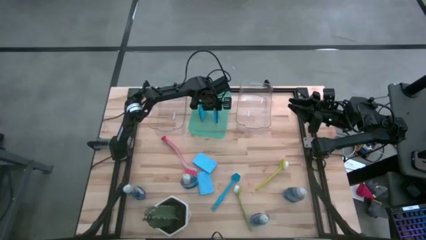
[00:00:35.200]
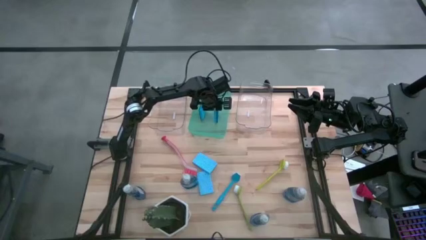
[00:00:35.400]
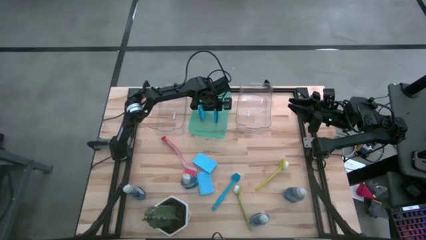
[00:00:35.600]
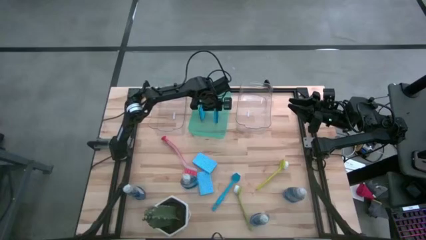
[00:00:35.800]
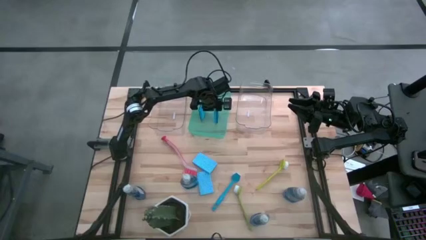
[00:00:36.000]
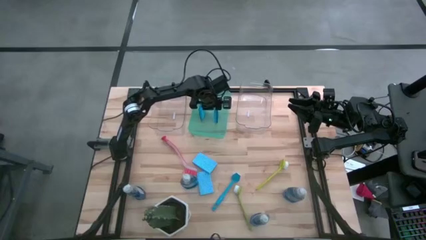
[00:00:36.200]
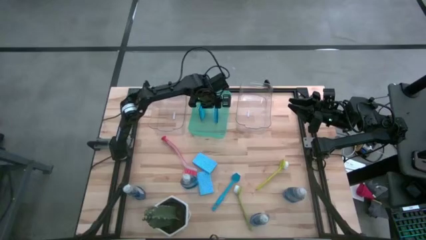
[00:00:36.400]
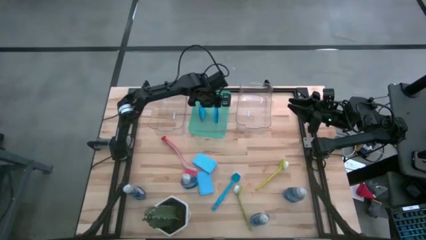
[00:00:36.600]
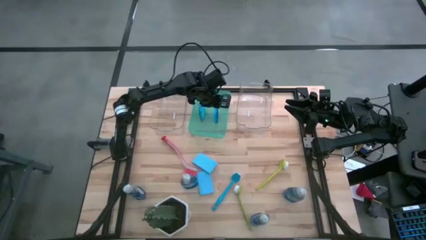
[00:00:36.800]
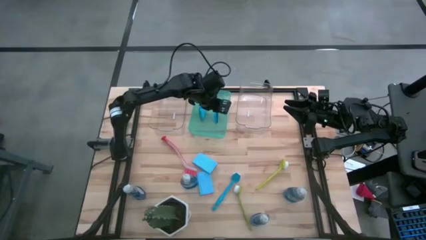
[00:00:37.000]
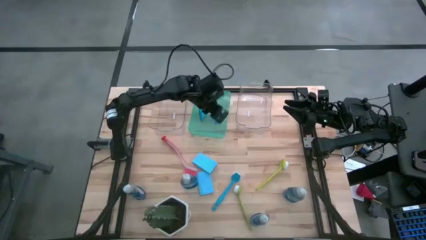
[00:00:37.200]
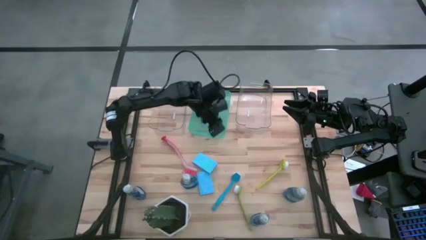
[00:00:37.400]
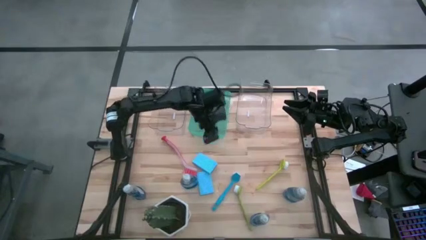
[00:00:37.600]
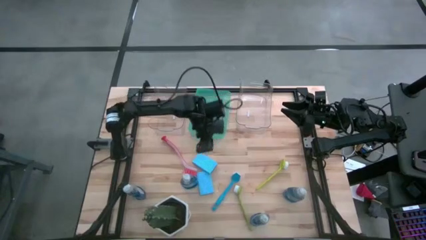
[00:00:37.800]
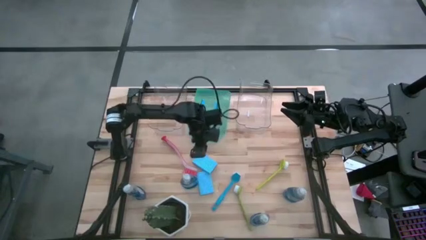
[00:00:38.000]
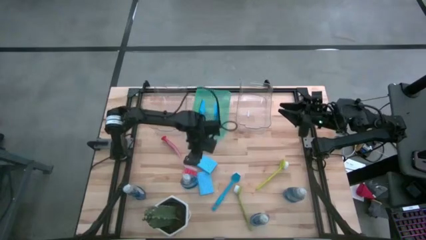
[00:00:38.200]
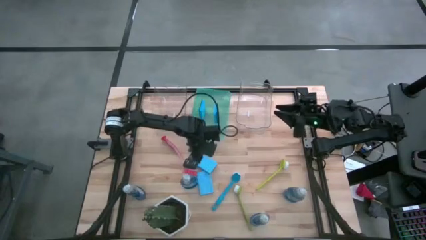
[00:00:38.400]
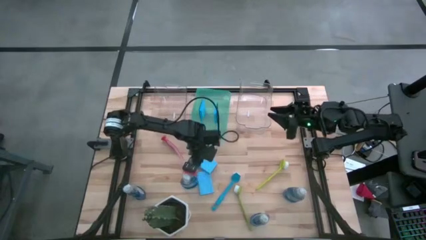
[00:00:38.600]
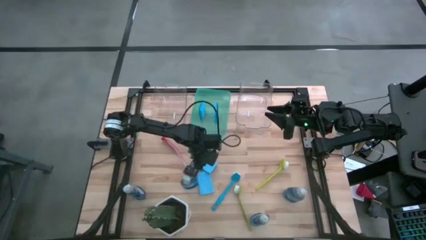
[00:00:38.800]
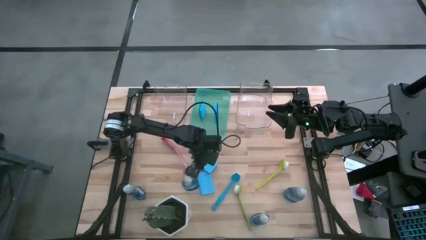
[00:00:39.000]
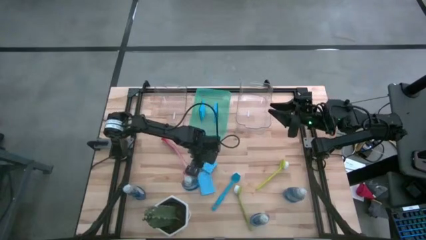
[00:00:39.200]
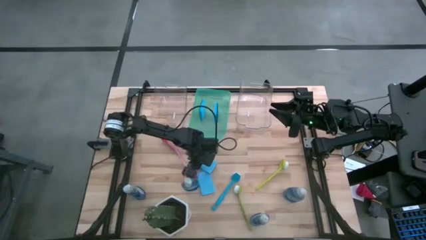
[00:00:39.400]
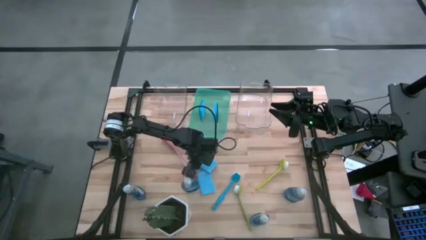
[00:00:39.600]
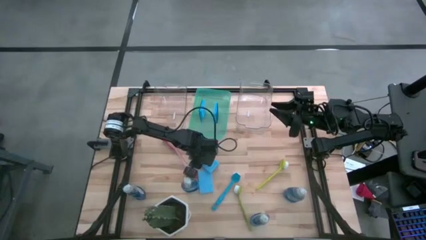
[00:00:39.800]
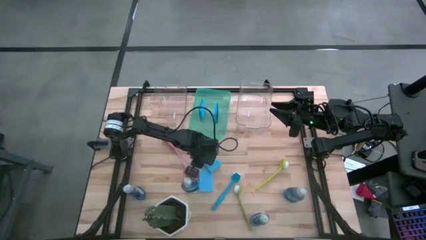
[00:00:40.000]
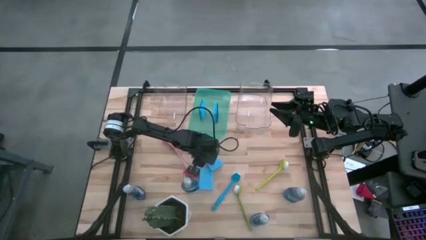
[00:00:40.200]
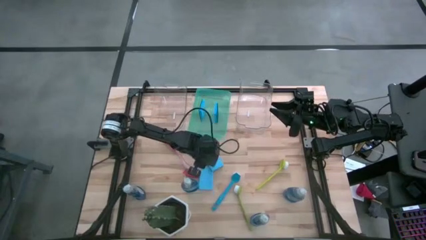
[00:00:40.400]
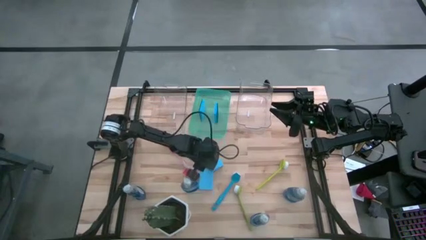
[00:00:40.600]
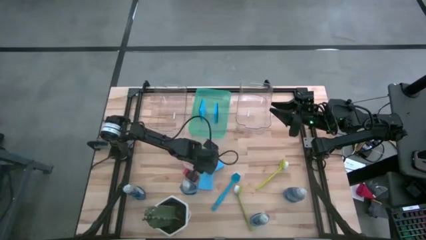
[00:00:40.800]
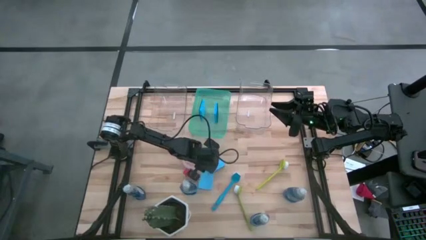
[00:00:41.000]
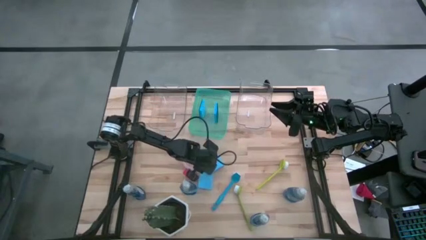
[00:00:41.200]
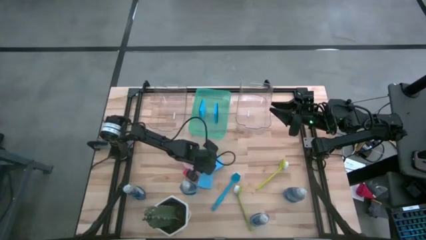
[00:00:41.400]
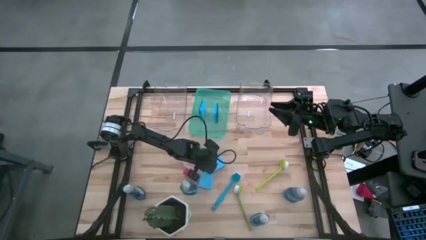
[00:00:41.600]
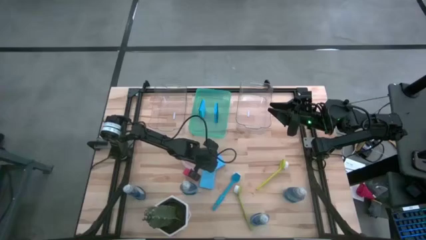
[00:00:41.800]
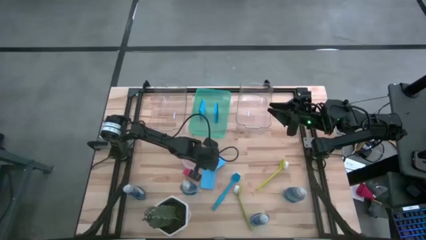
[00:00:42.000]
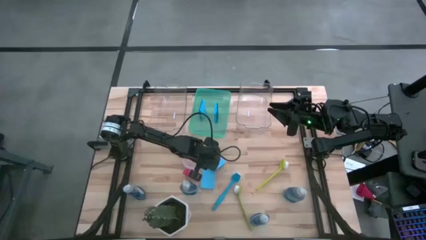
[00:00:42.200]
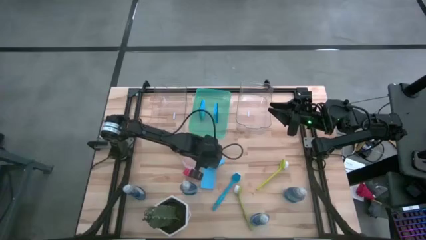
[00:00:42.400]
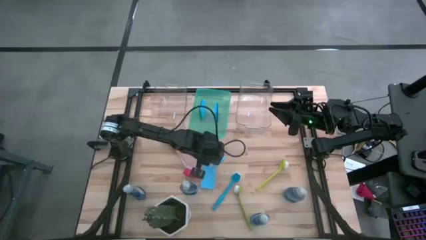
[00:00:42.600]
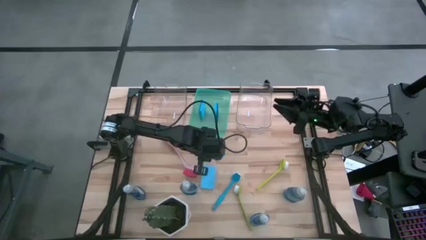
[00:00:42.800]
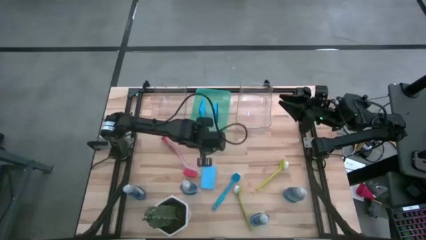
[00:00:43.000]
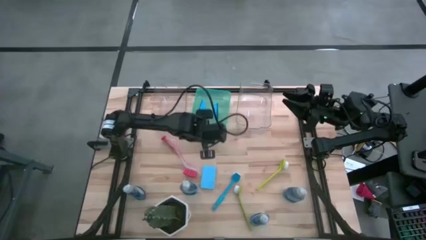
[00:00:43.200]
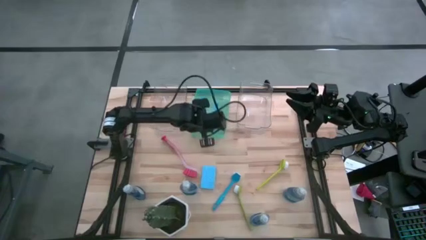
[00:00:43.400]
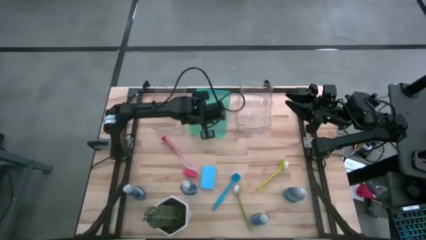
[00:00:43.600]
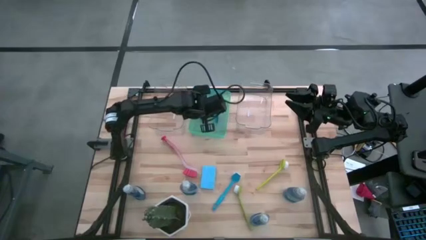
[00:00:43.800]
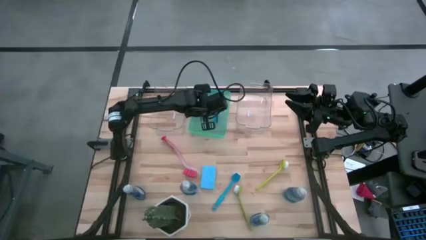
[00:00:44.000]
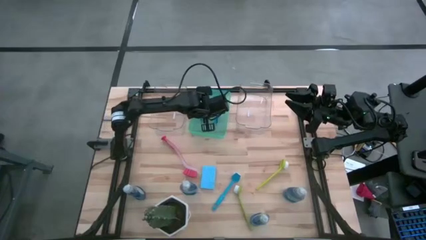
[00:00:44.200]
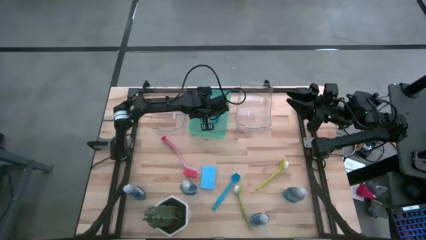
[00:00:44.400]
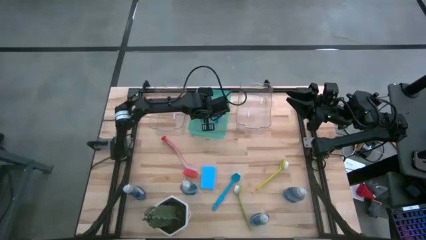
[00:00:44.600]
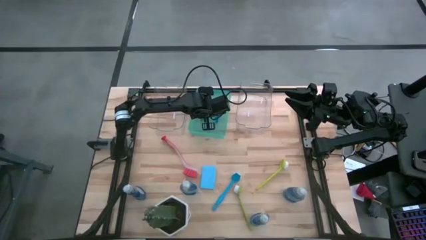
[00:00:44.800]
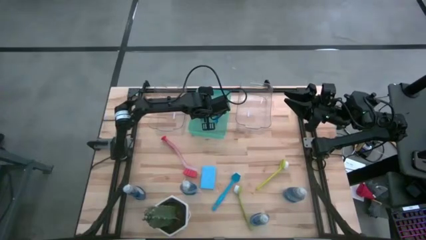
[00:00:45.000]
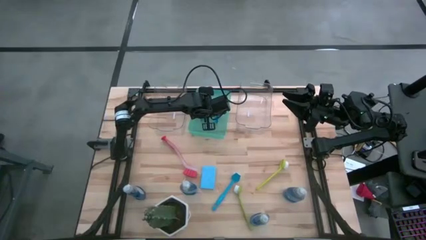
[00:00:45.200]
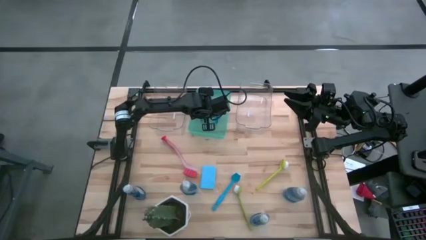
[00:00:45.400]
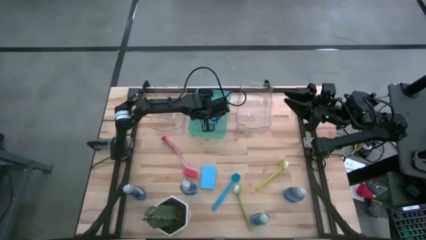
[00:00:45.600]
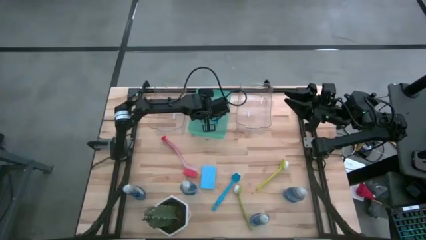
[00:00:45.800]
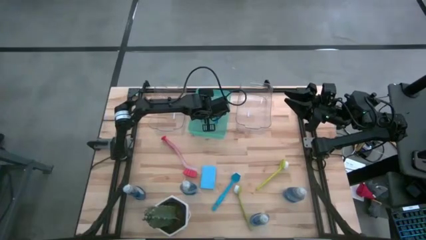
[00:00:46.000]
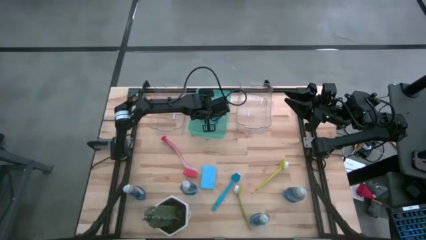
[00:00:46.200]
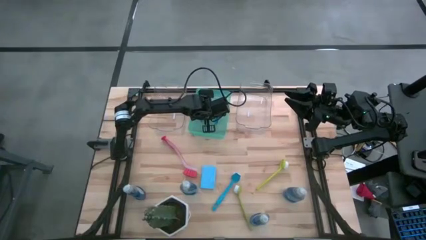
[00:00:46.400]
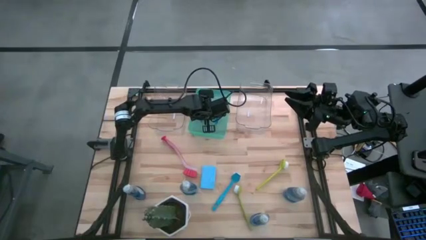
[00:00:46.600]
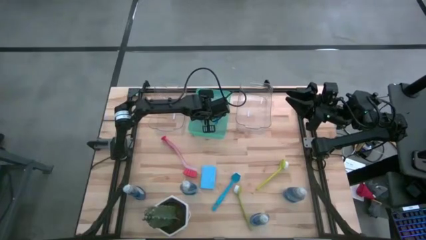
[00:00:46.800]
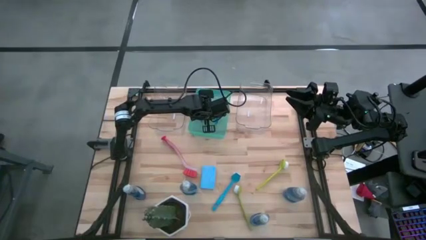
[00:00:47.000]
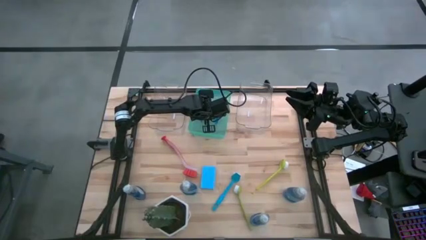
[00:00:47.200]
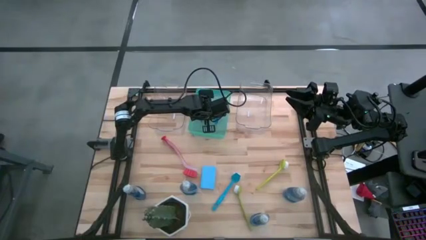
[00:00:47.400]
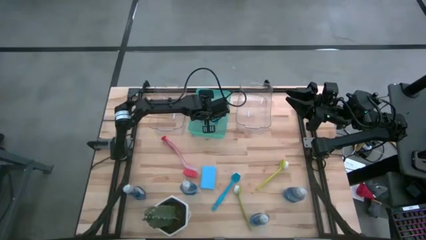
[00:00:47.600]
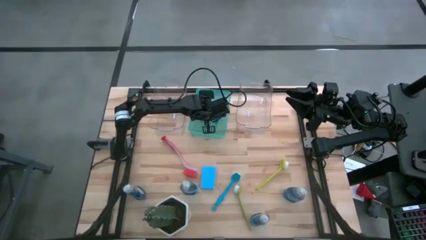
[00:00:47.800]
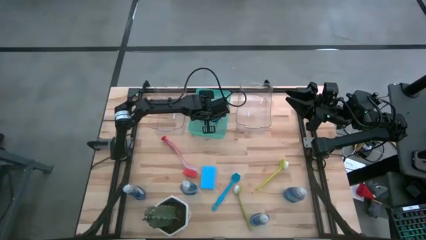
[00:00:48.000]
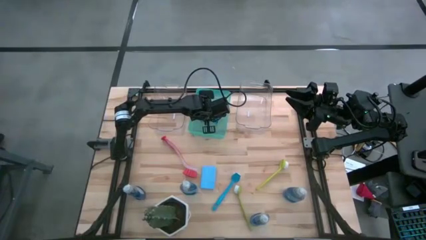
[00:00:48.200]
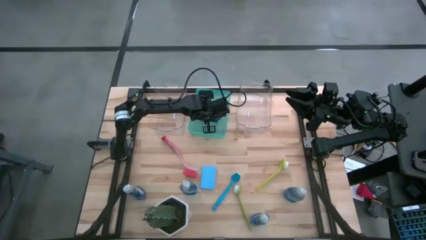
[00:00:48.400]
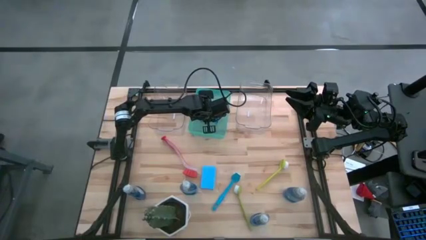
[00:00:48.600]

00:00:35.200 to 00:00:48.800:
Task: Pick & Place Kitchen Sink Supplies
Put the sponge into the green bin

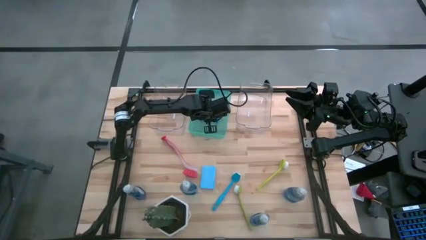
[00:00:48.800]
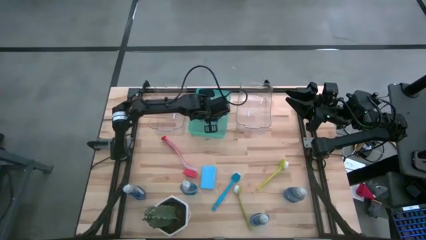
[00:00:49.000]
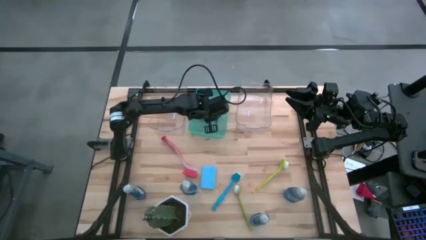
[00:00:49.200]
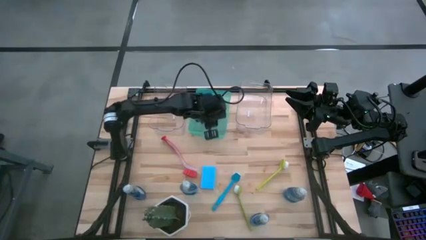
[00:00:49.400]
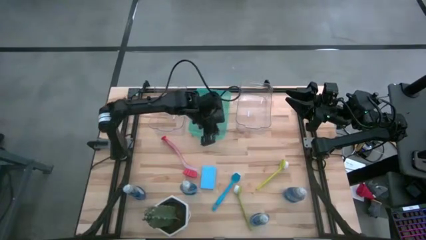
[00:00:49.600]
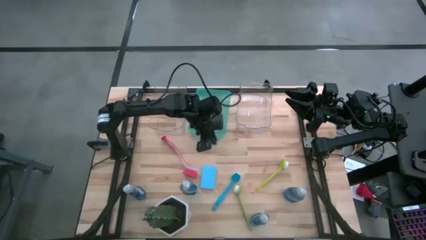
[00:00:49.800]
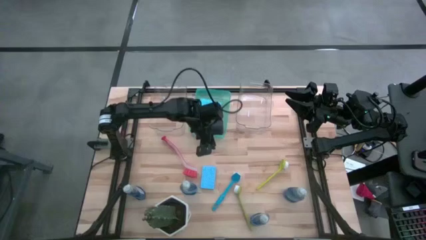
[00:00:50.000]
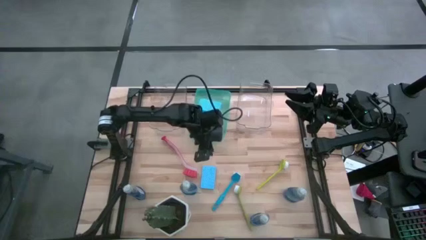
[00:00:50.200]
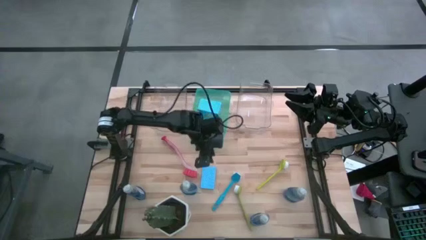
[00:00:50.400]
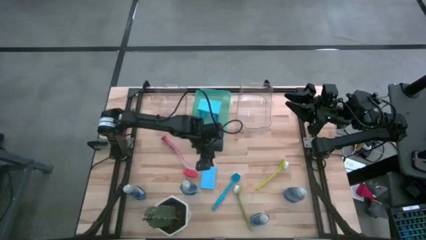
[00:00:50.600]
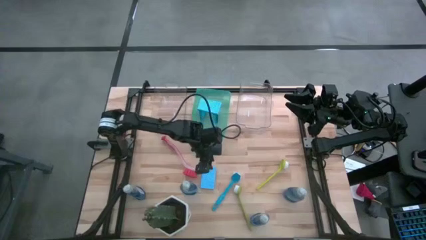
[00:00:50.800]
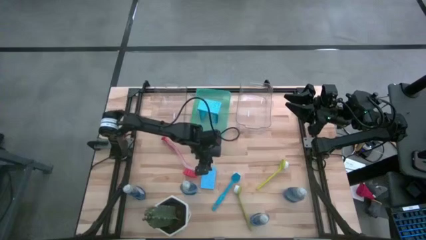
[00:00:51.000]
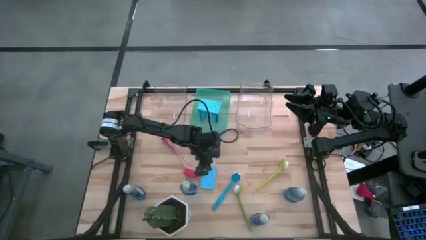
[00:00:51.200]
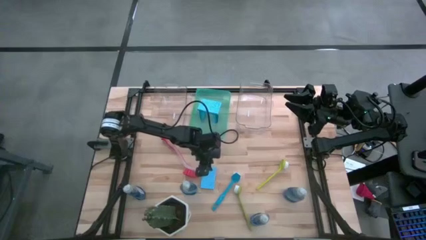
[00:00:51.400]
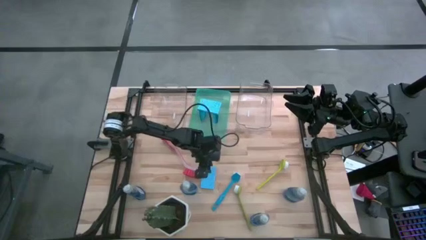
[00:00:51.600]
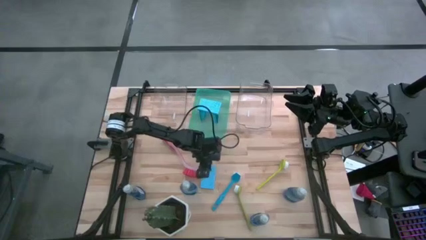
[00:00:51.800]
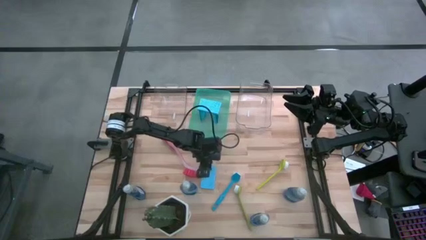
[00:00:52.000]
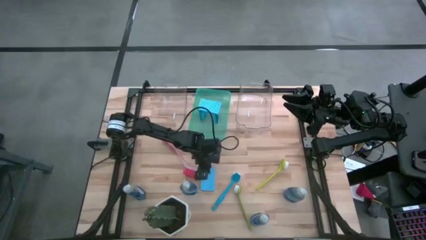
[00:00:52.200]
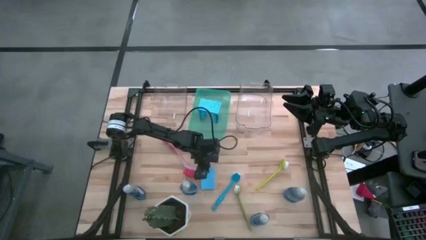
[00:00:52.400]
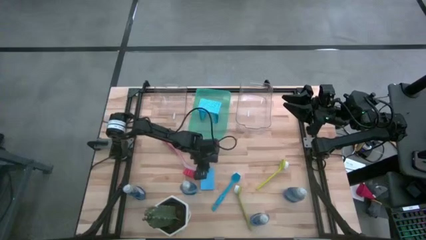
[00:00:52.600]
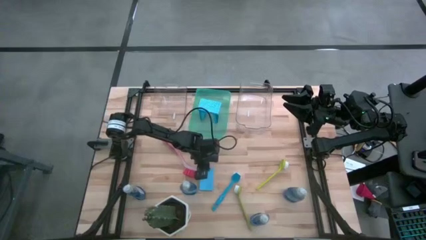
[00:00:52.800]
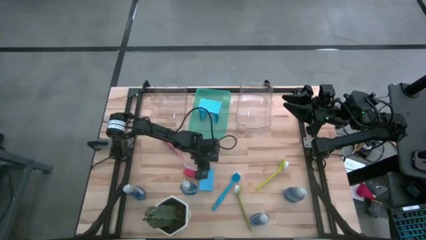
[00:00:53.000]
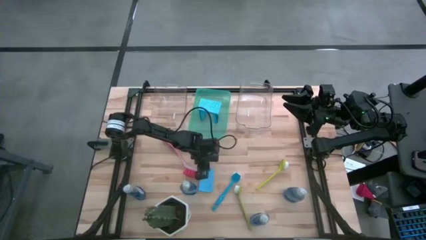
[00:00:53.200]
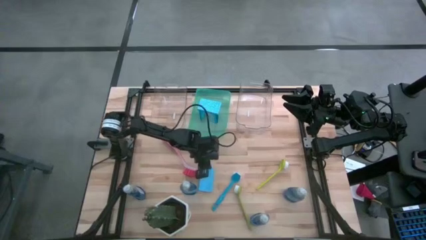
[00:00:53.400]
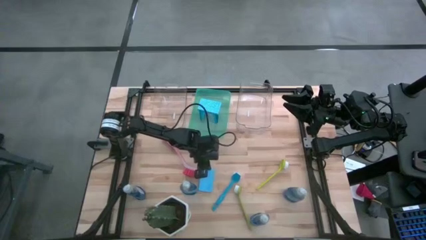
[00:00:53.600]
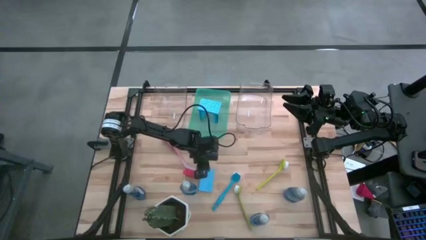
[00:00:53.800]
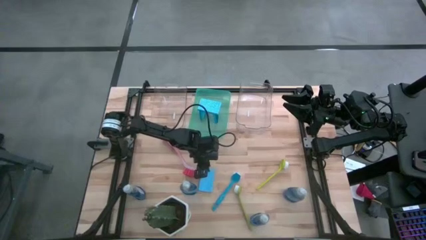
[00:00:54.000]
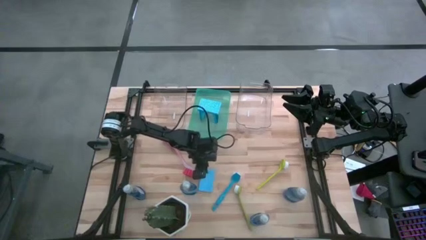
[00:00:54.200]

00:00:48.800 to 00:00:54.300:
Put the sponge into the green bin
